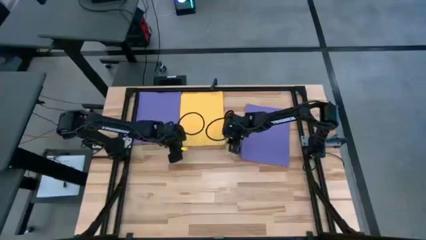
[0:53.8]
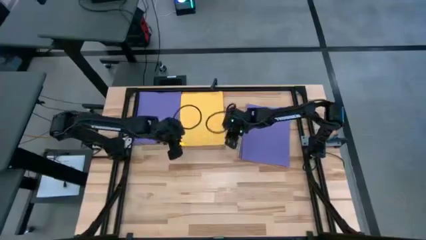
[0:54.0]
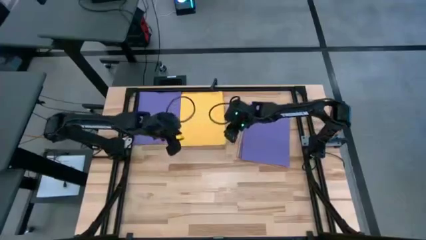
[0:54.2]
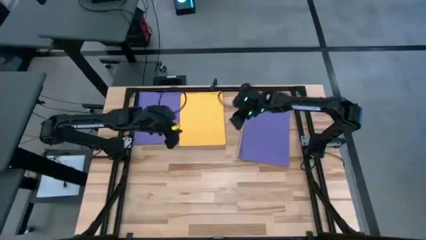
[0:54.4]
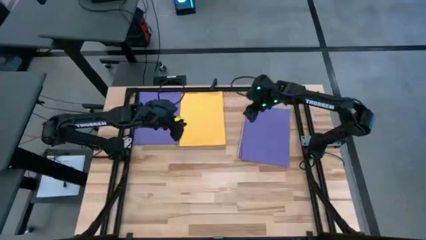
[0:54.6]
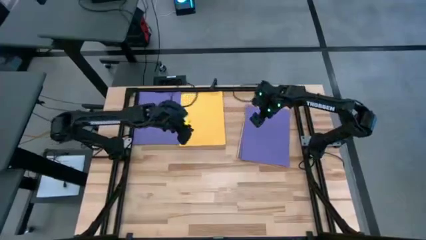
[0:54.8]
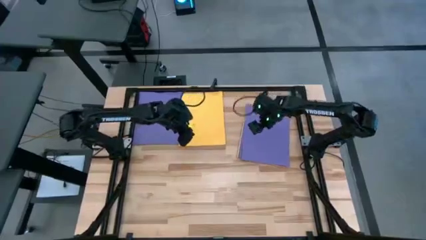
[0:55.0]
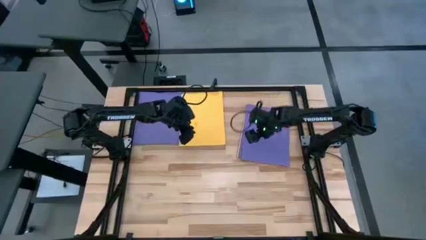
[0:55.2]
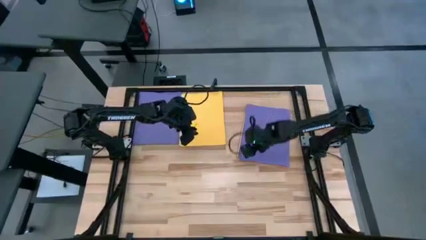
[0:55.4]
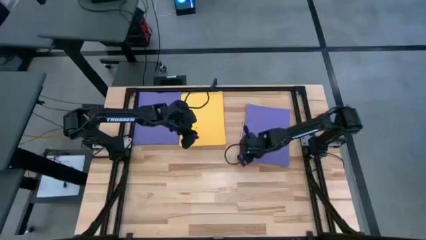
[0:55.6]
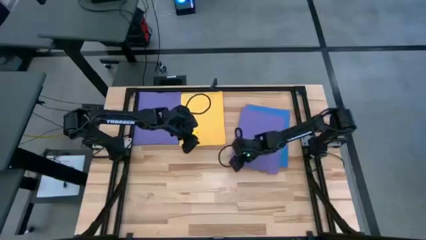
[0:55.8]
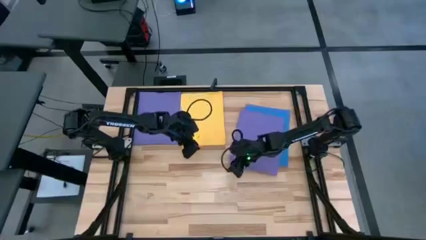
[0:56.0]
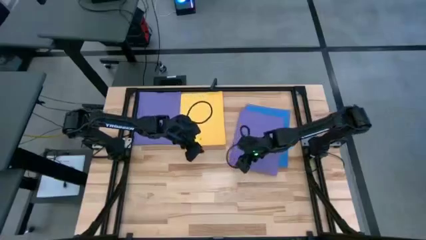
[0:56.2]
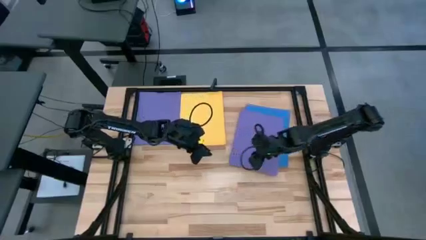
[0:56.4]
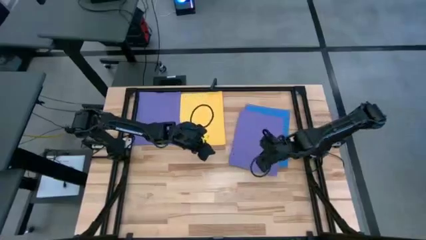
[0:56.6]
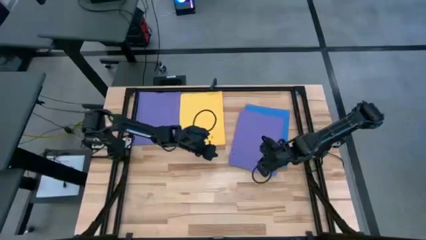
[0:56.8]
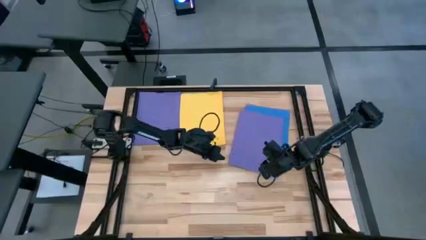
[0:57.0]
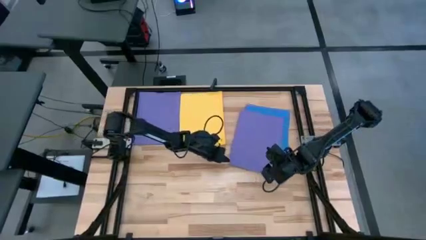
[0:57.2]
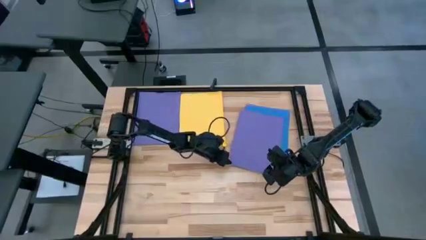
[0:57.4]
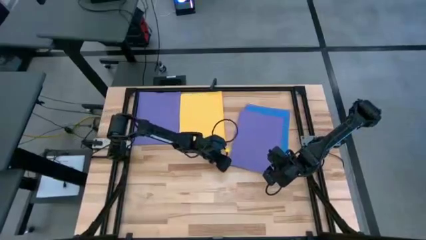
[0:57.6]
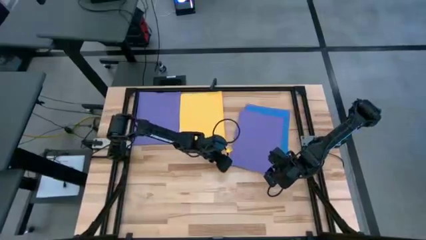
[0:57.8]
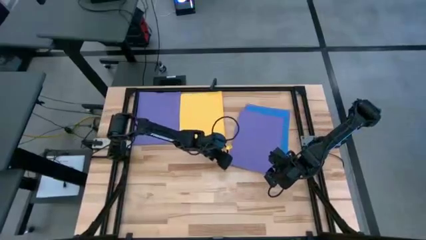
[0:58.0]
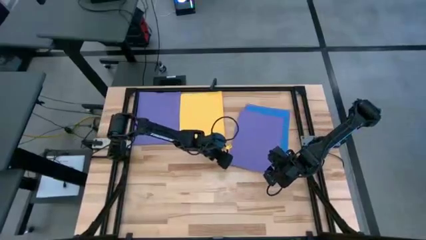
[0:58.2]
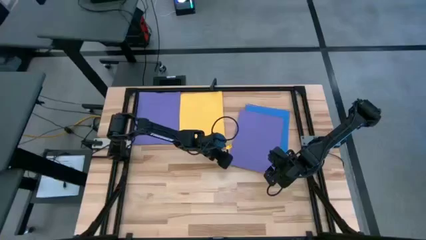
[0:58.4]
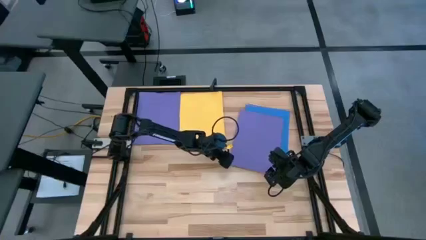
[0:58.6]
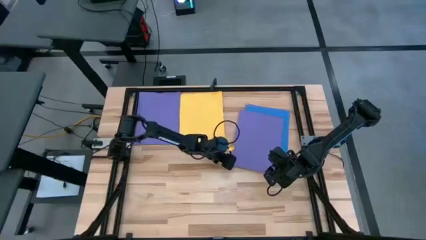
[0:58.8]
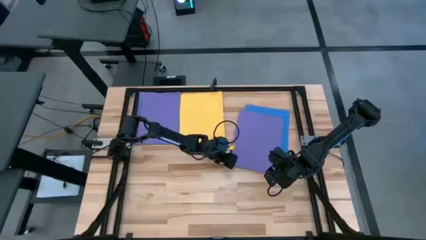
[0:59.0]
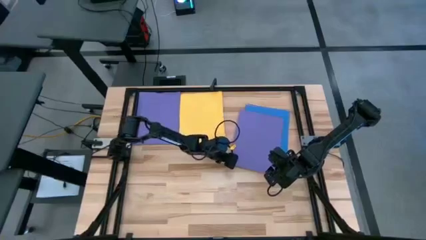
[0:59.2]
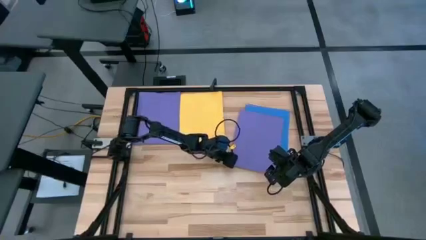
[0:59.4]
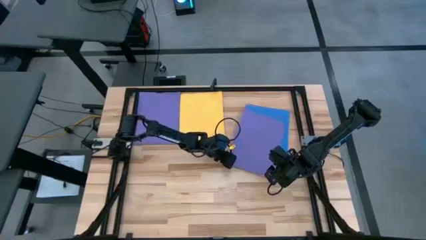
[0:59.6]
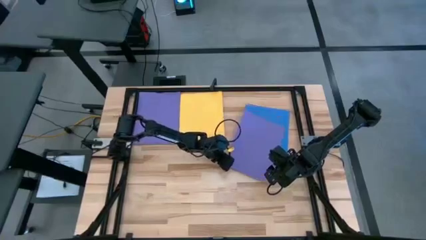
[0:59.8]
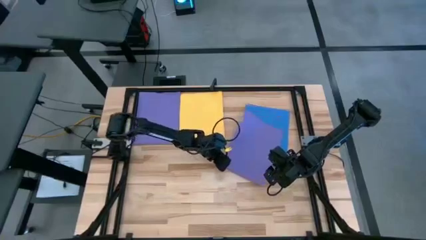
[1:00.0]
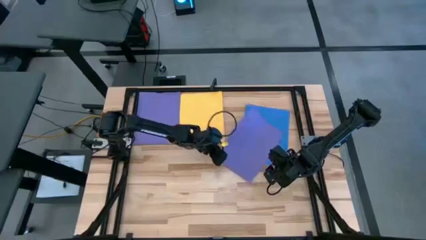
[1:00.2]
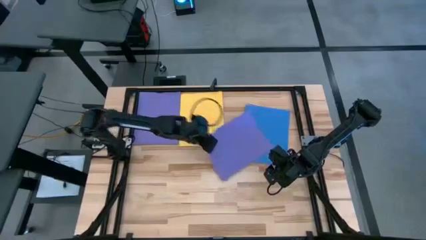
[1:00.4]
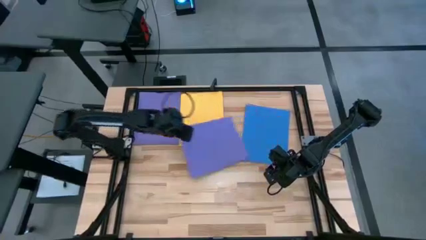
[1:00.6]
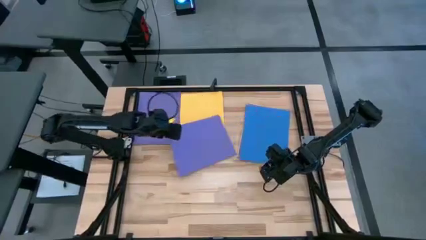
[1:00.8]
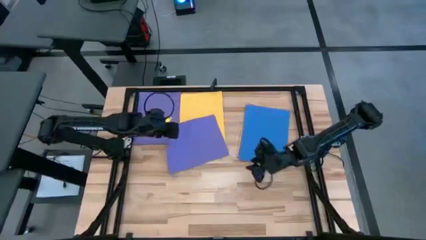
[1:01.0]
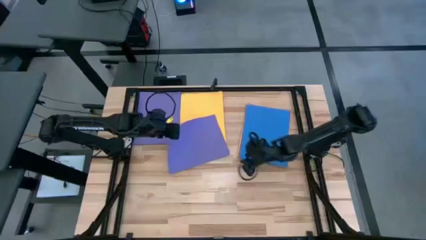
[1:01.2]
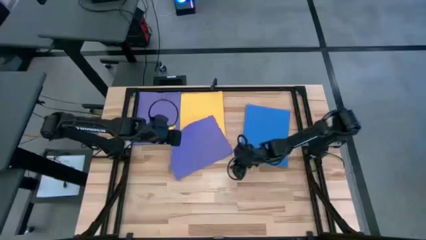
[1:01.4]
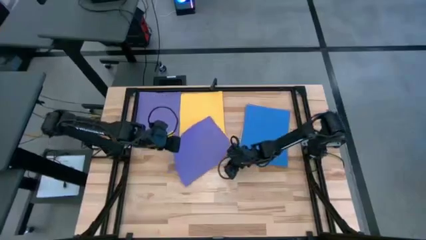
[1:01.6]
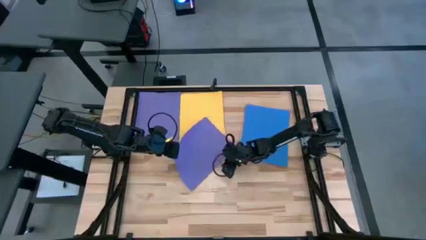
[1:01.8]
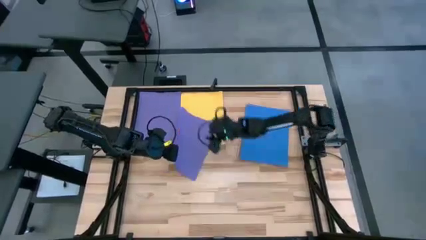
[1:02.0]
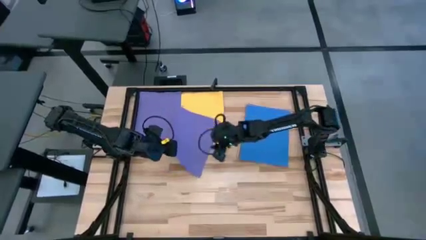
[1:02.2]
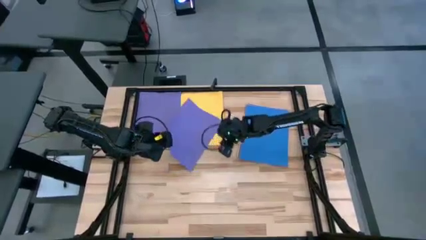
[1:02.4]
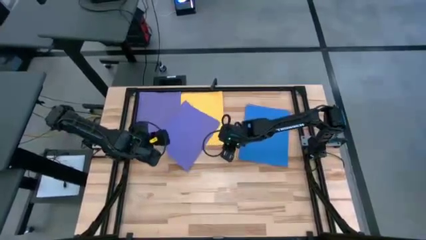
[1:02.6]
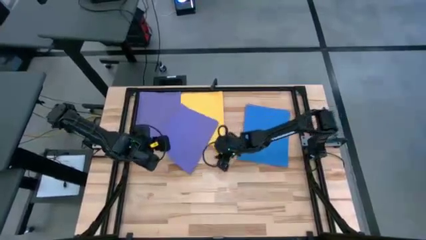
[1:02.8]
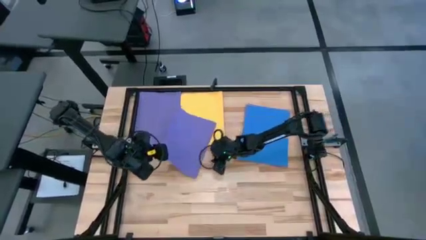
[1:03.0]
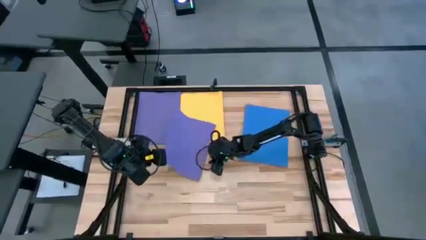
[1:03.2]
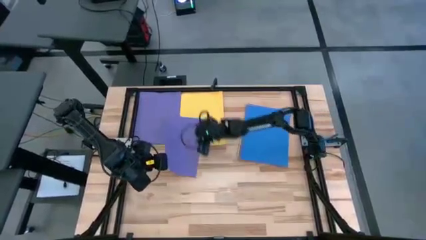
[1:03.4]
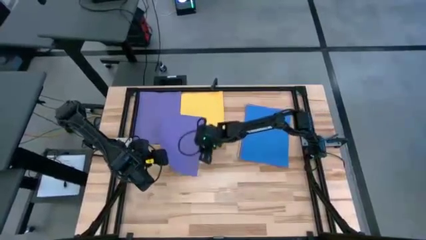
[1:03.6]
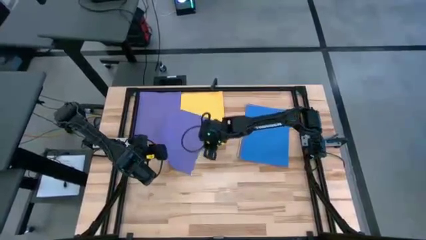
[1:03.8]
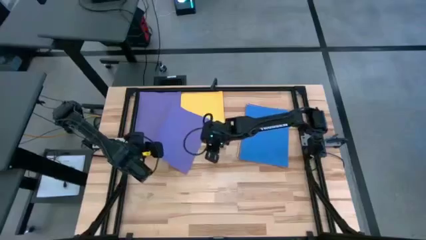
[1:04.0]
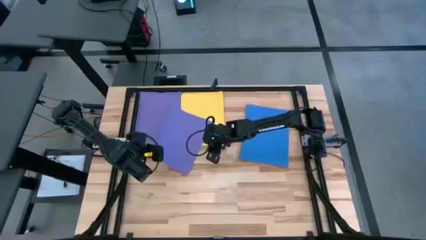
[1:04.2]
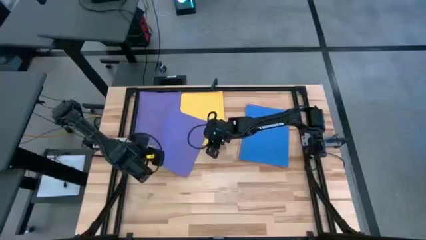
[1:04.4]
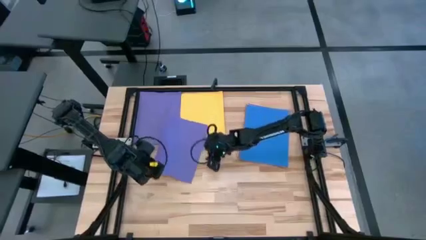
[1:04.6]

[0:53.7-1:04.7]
Task: Organize paper
Stack the purple paper on top of the purple paper

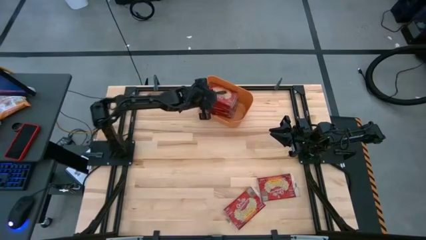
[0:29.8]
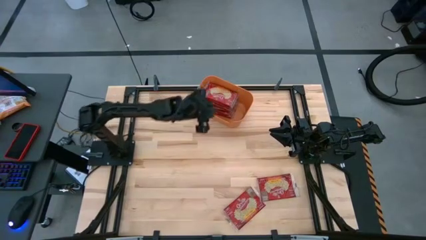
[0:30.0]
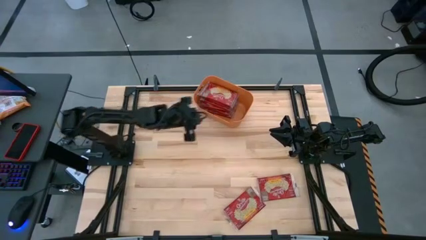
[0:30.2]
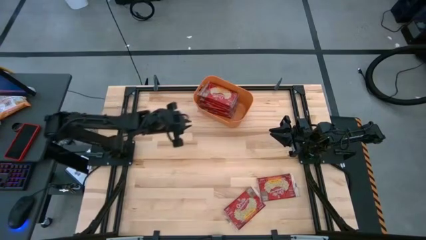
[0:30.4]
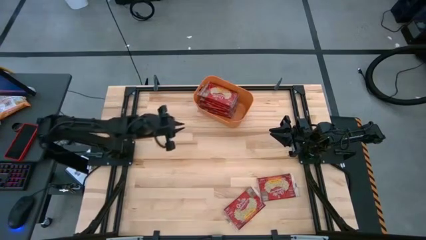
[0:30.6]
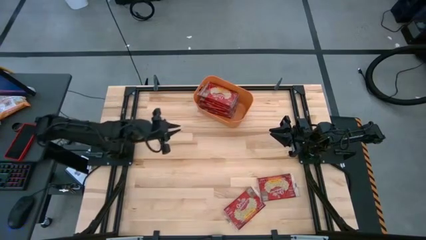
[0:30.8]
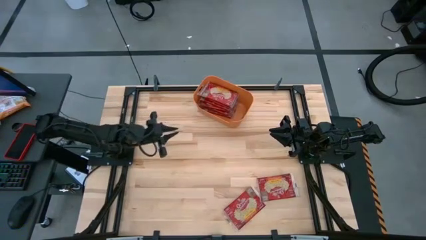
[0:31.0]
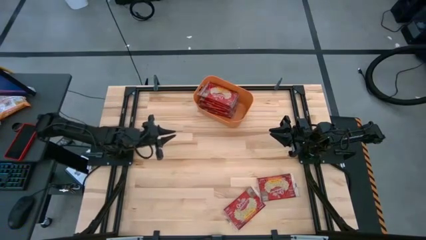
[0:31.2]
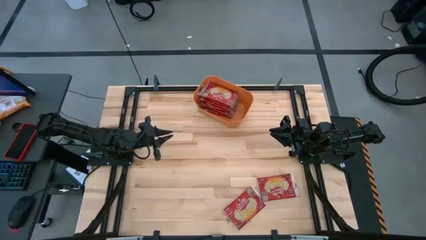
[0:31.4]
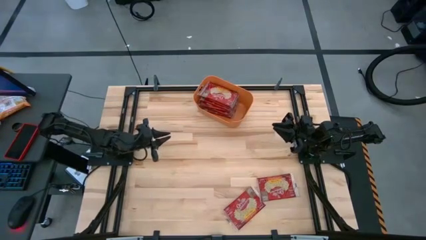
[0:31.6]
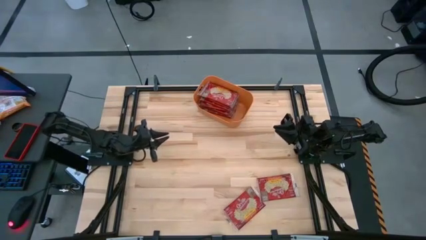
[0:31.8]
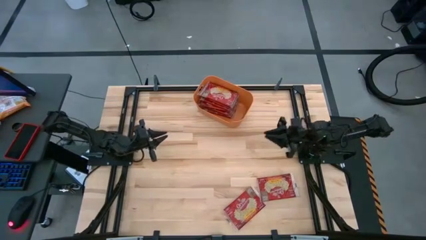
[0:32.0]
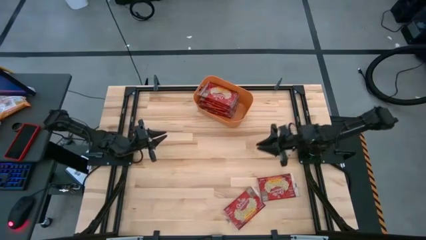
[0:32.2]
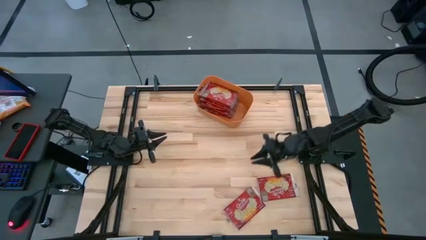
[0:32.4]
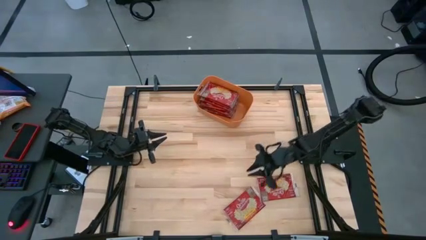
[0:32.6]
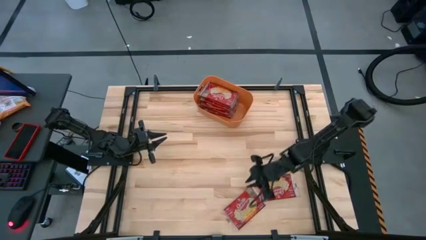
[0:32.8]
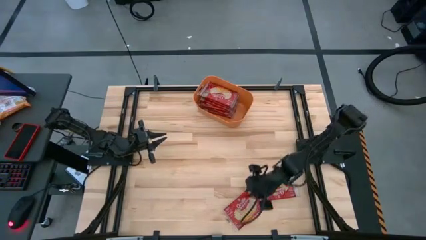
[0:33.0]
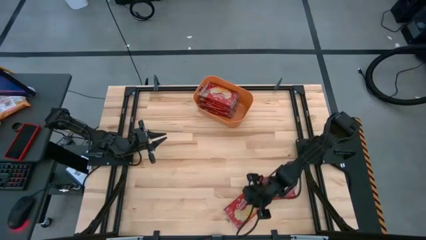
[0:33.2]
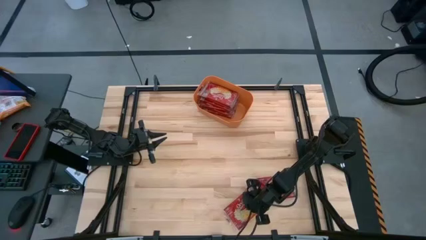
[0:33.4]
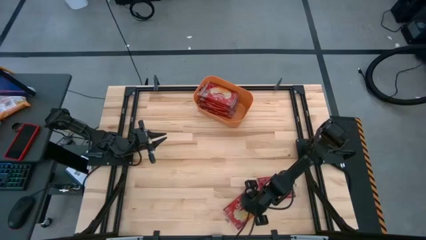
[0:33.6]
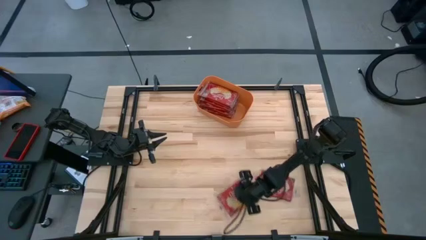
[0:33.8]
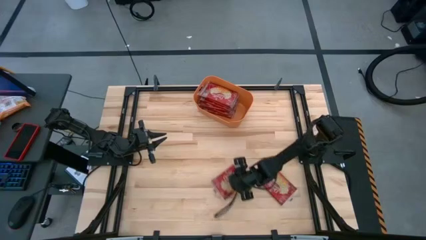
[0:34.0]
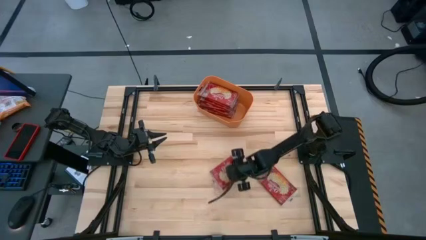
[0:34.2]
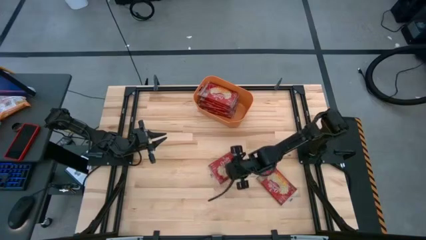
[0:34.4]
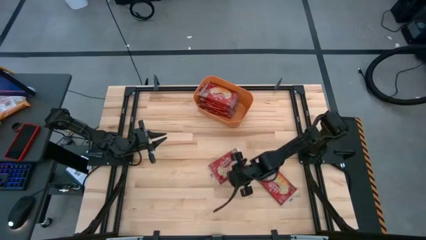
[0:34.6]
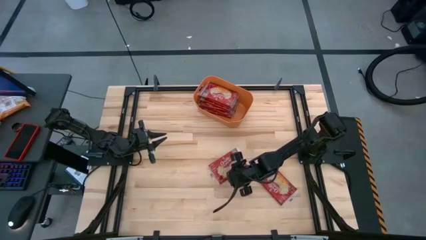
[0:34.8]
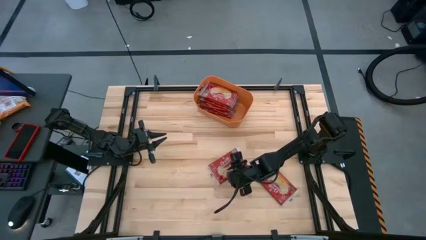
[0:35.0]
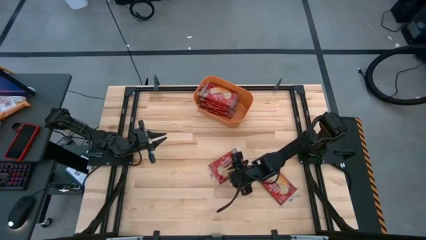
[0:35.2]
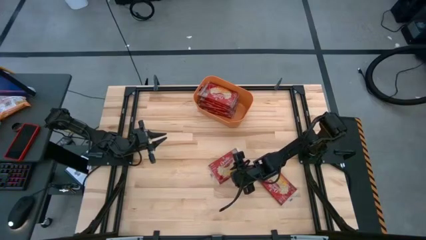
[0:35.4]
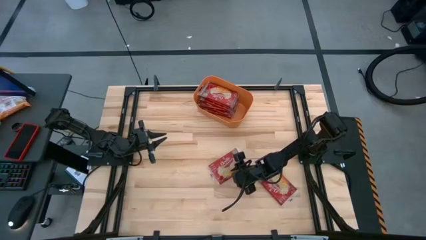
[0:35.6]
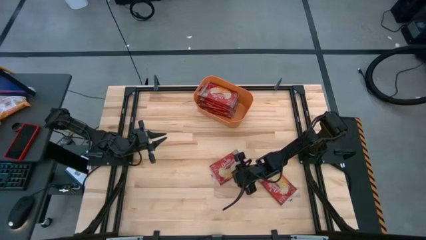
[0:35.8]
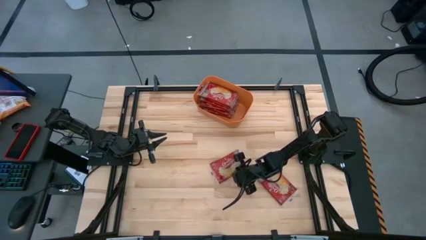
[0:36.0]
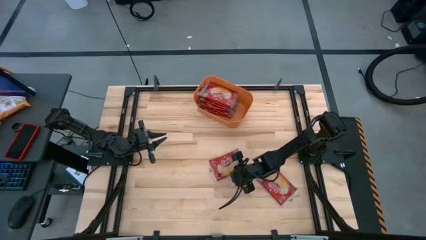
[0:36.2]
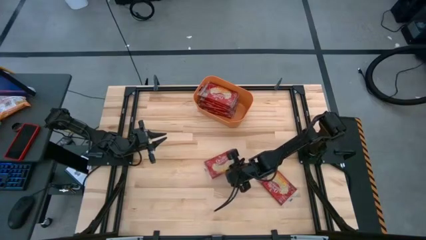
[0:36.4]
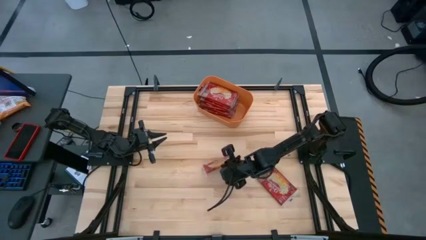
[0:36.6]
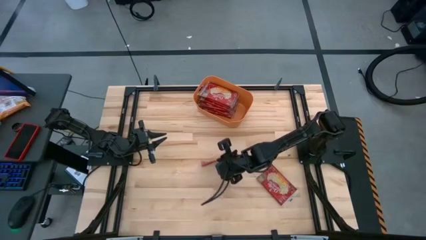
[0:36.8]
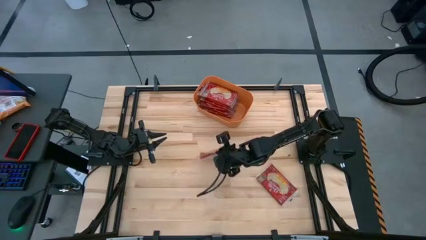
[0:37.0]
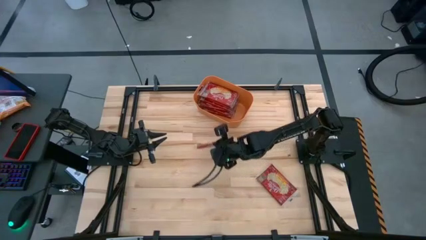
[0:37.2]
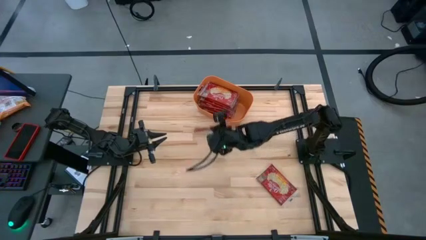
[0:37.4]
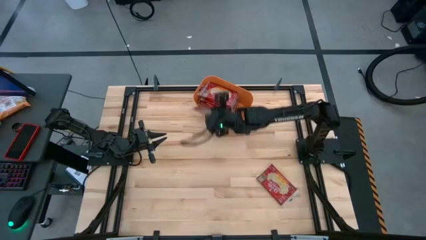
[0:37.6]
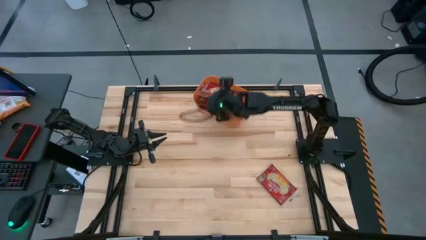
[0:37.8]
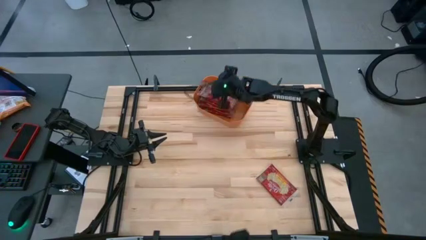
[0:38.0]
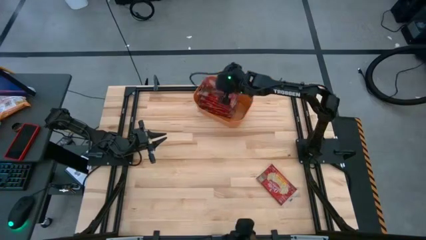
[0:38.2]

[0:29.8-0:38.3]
Task: Sort popcorn bags into baskets
Put the red popcorn pack into the orange bin
